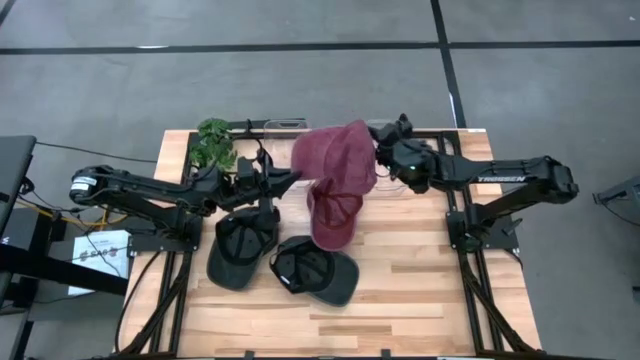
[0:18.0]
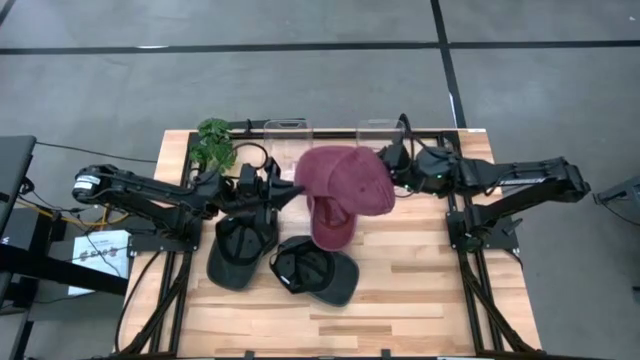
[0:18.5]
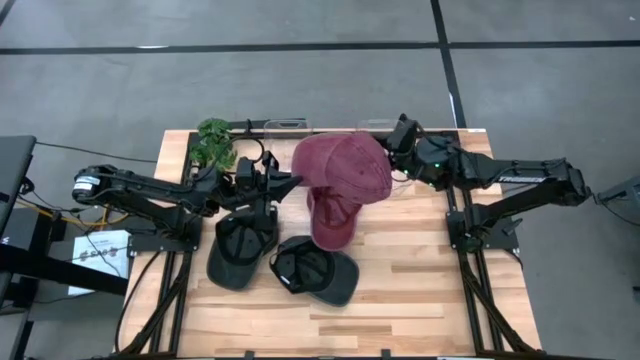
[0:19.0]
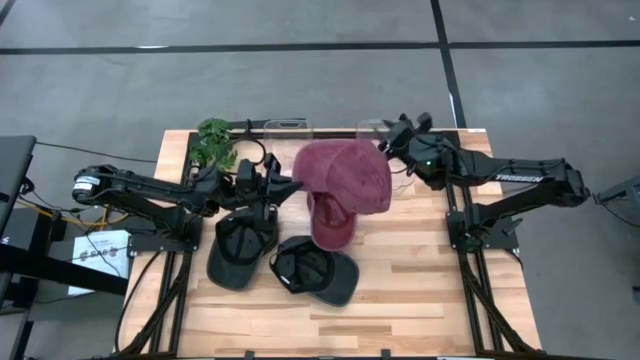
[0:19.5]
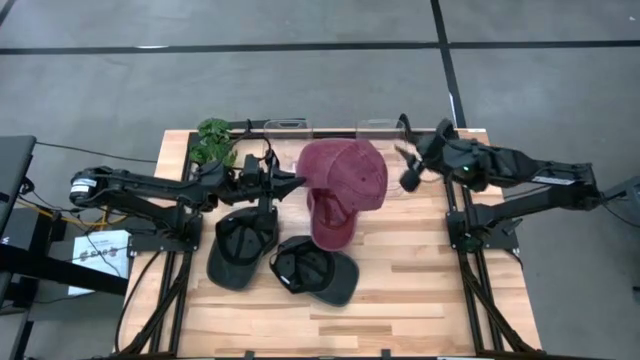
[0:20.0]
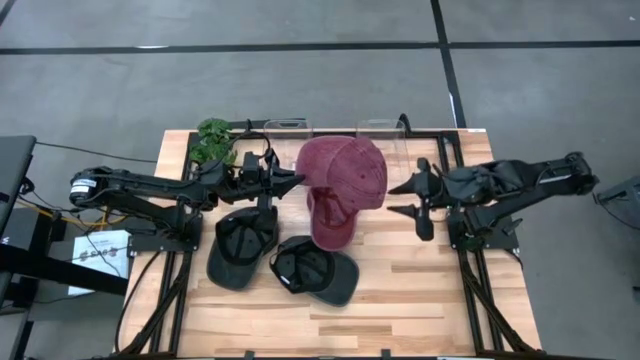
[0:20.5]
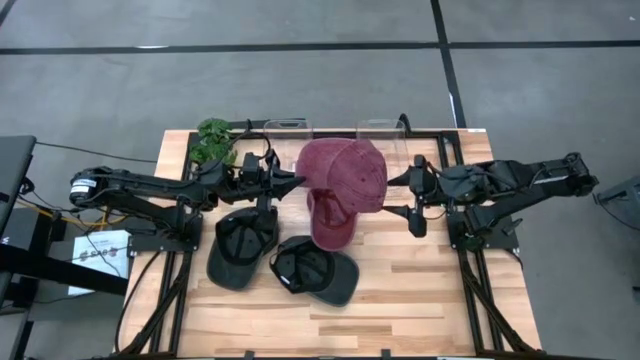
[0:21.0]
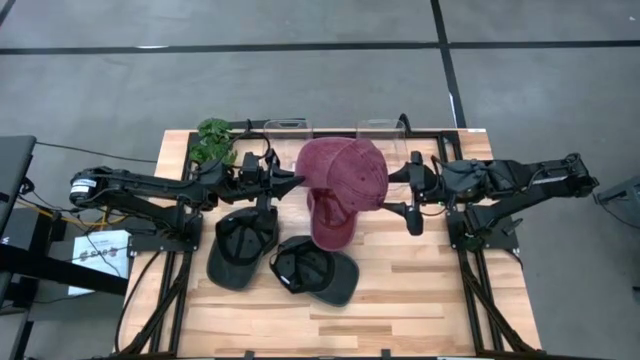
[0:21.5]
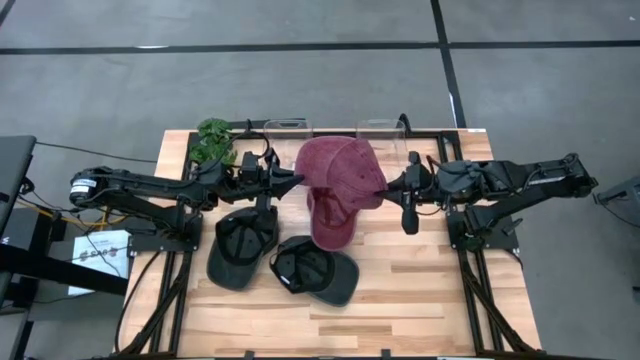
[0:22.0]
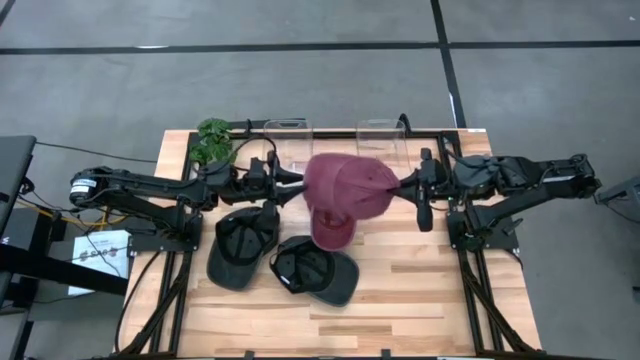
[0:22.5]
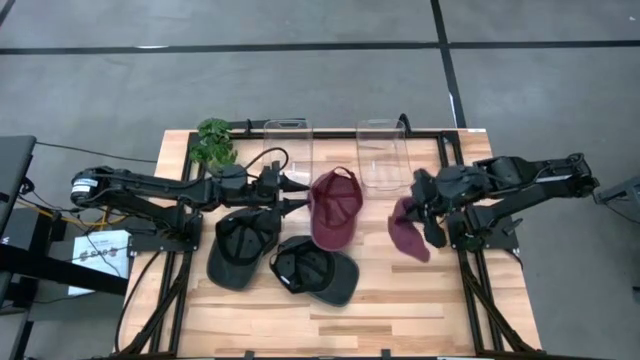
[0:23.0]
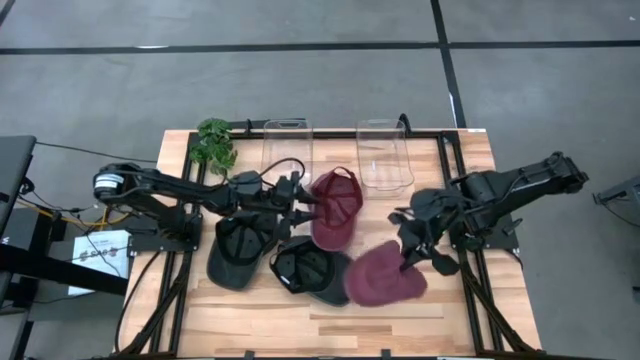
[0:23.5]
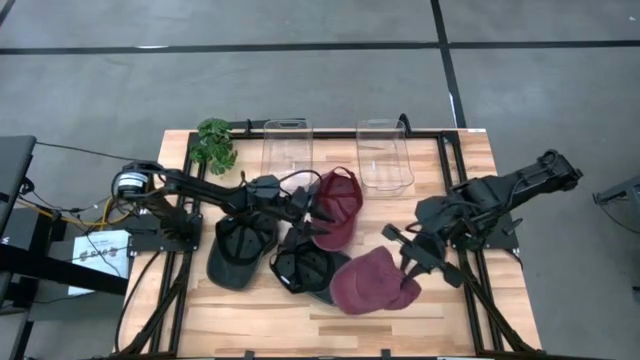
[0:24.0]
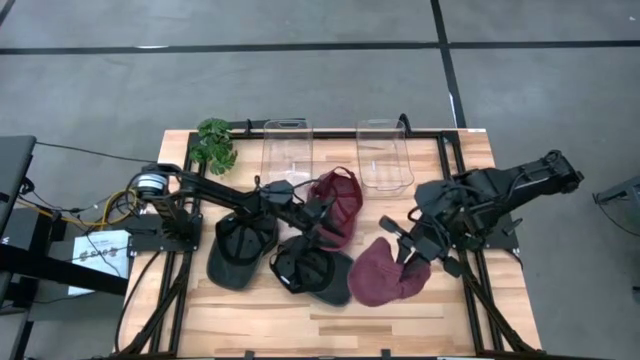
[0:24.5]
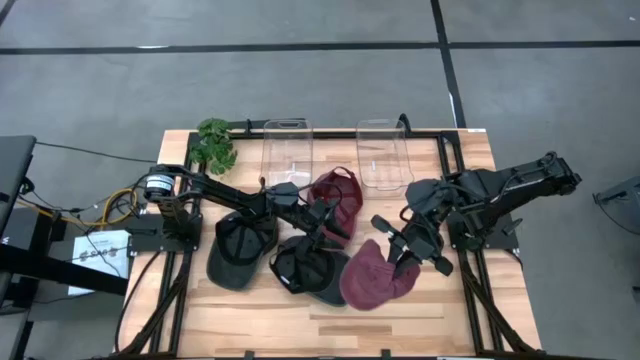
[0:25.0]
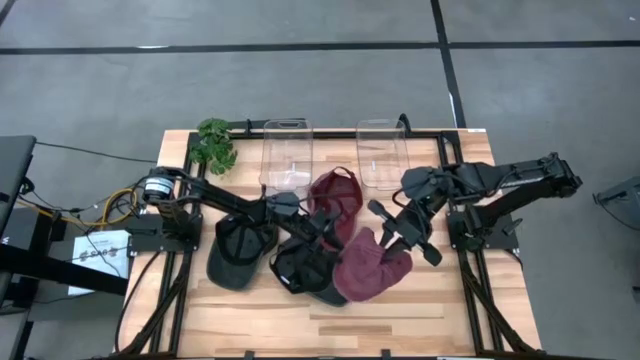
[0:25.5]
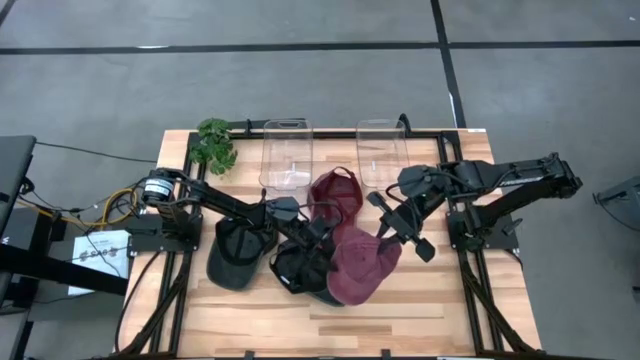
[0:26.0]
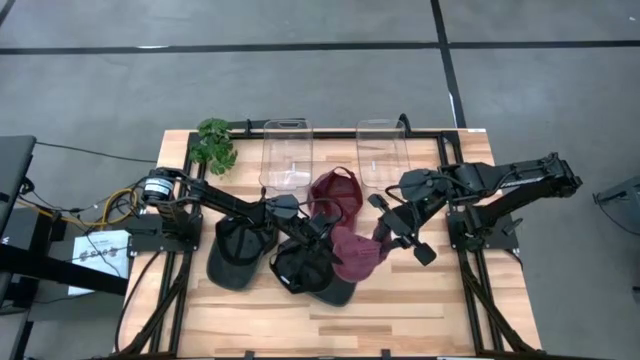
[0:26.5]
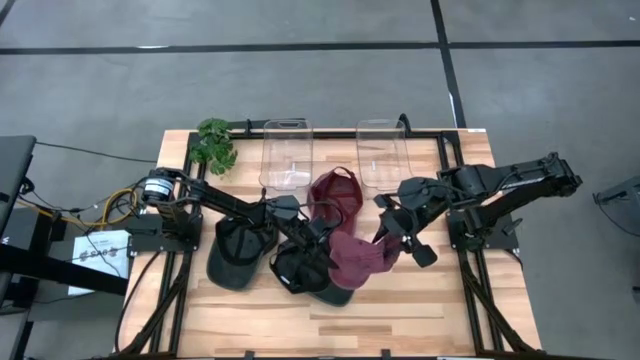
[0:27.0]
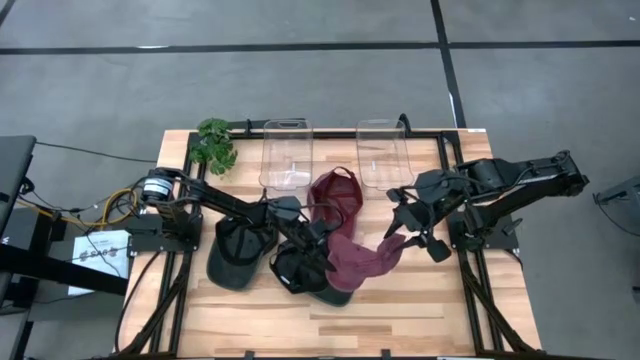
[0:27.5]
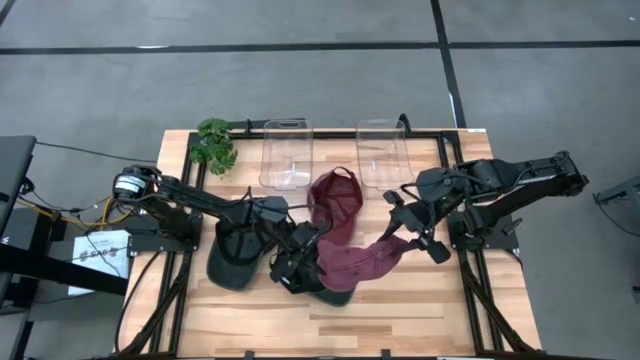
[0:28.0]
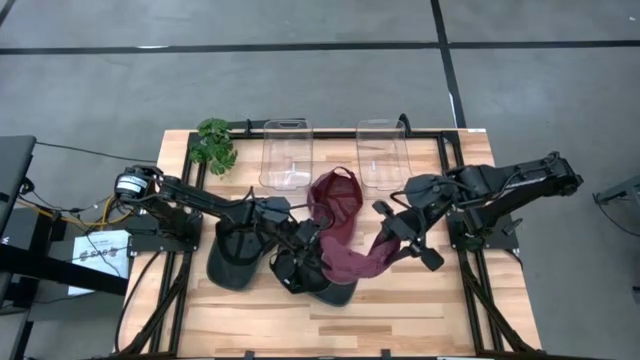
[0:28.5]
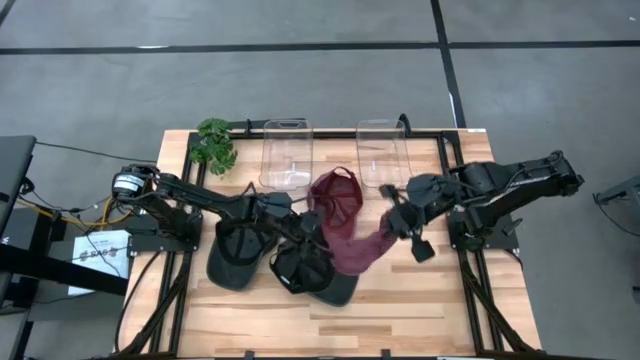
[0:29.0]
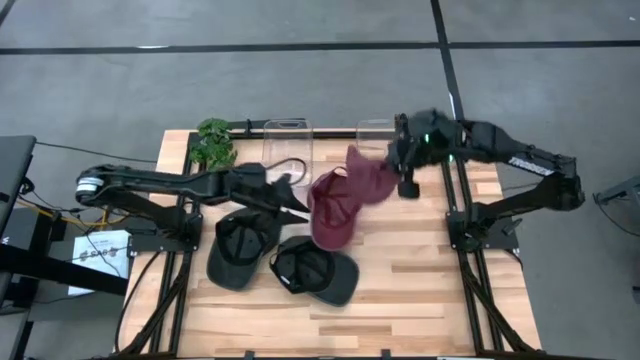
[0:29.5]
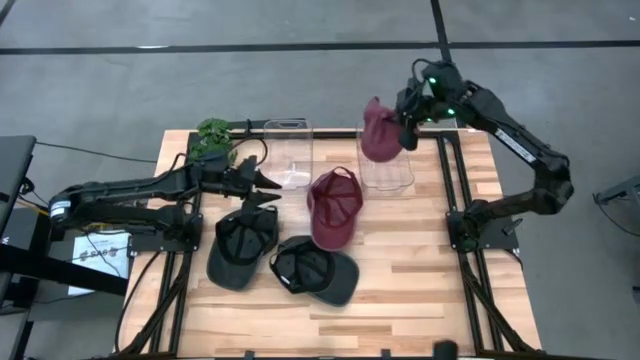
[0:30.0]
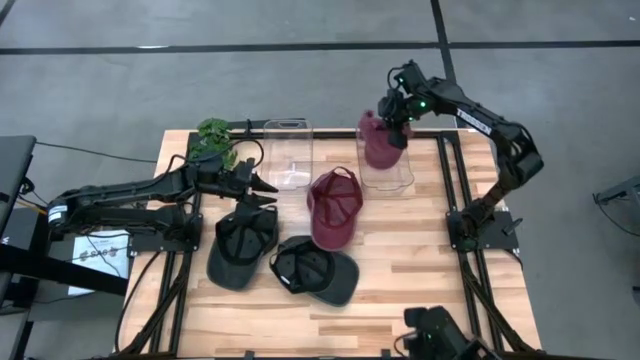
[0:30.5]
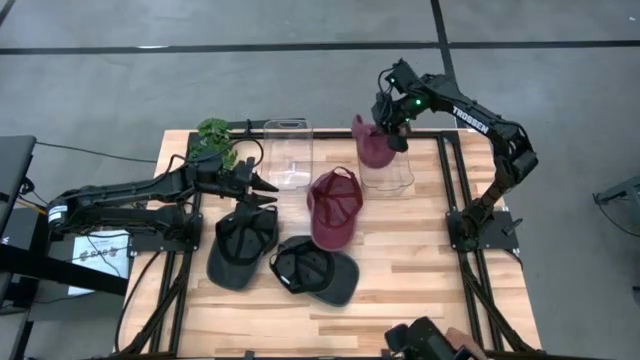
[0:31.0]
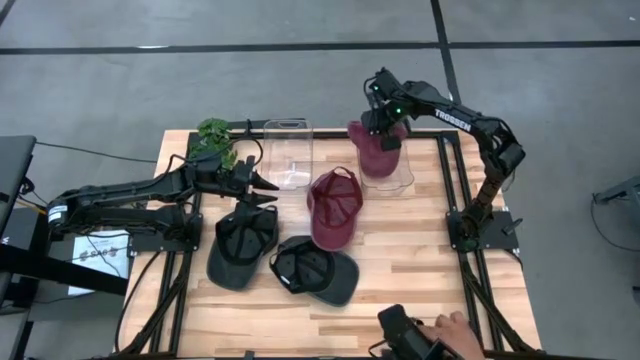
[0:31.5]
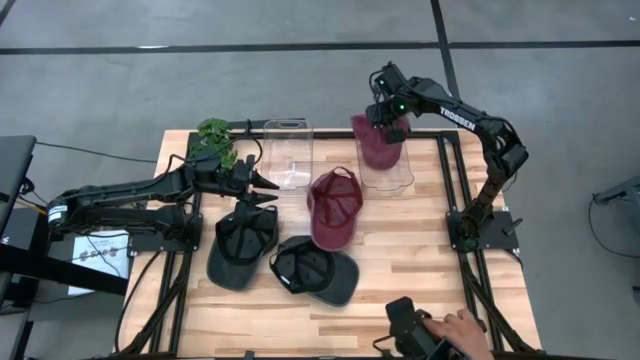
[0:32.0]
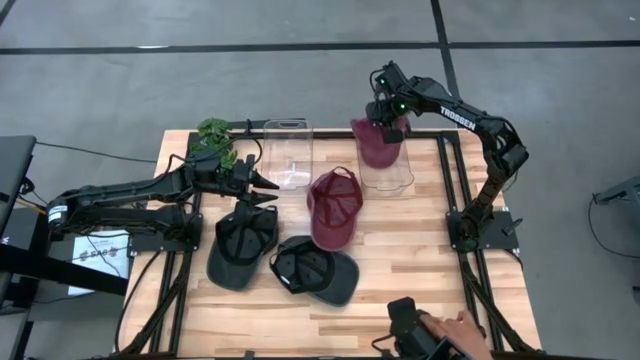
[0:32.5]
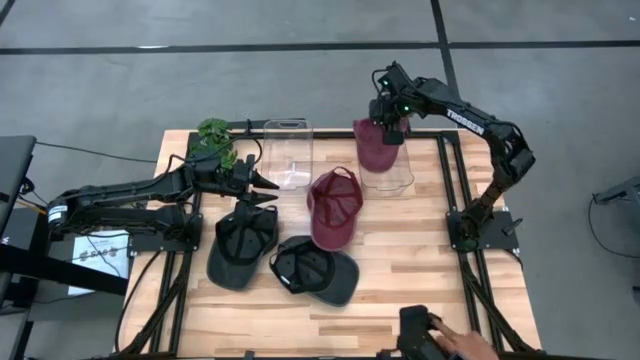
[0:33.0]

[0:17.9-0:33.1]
Task: Pick & Place hat
Put the right red cap into the right transparent bin

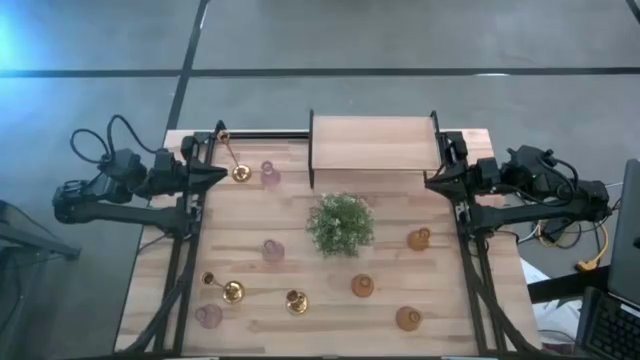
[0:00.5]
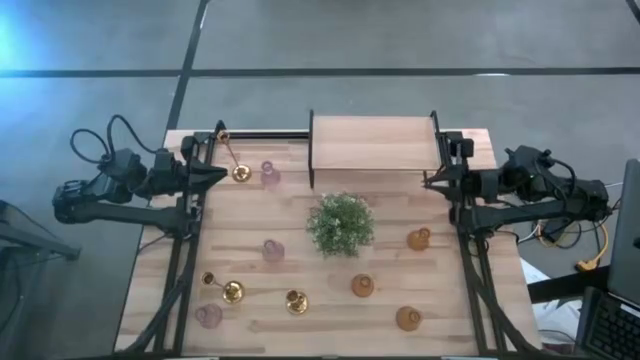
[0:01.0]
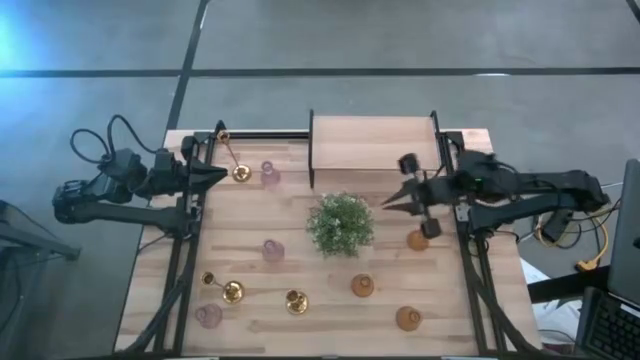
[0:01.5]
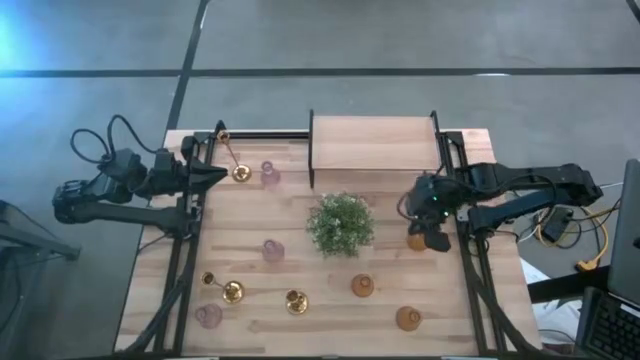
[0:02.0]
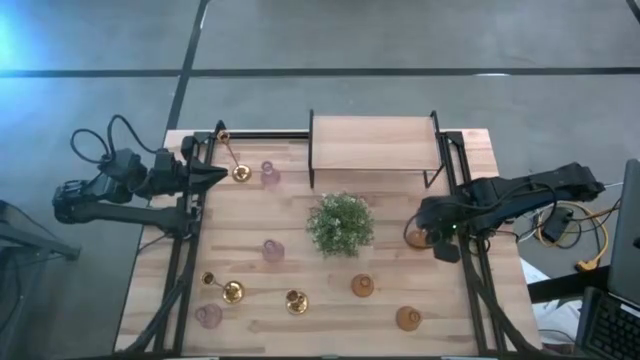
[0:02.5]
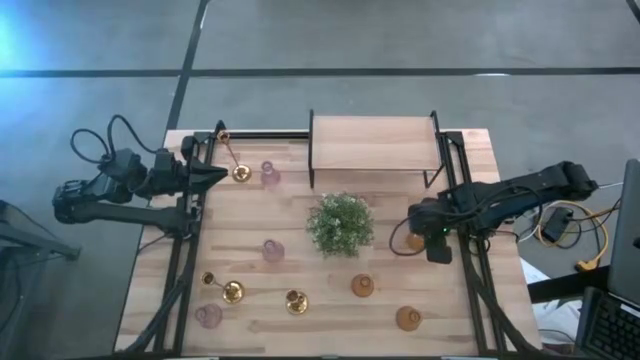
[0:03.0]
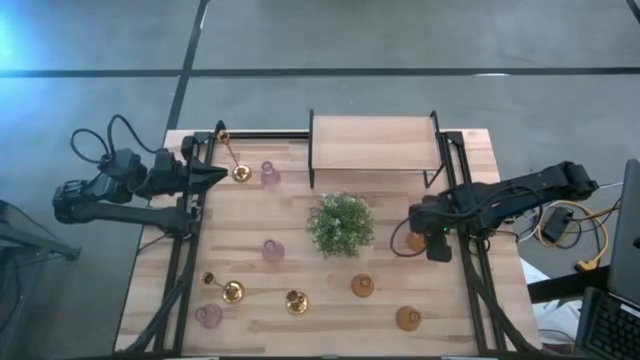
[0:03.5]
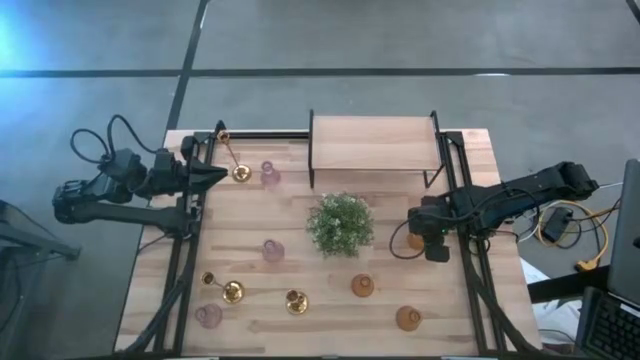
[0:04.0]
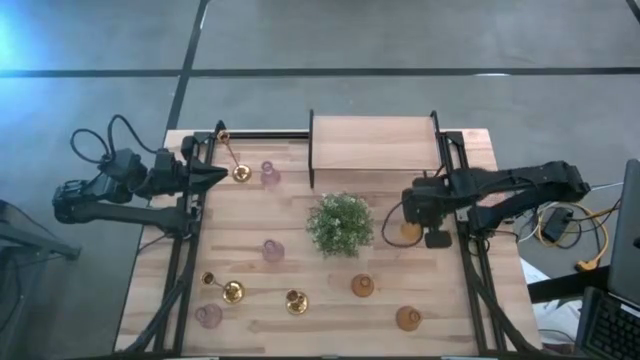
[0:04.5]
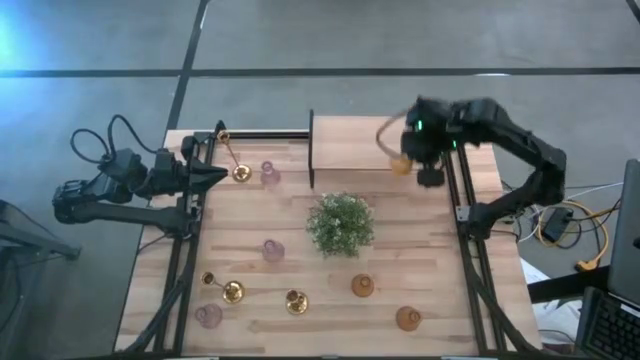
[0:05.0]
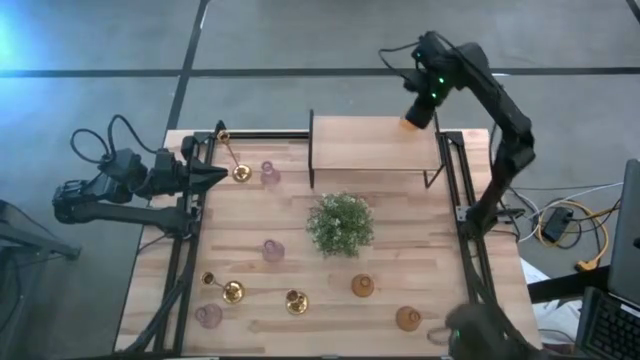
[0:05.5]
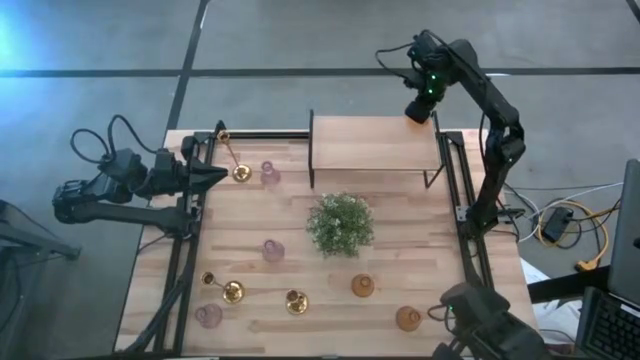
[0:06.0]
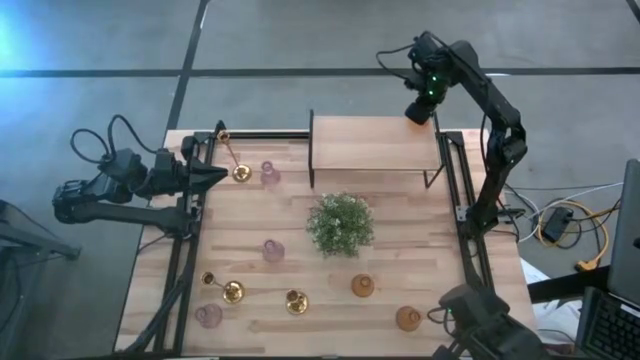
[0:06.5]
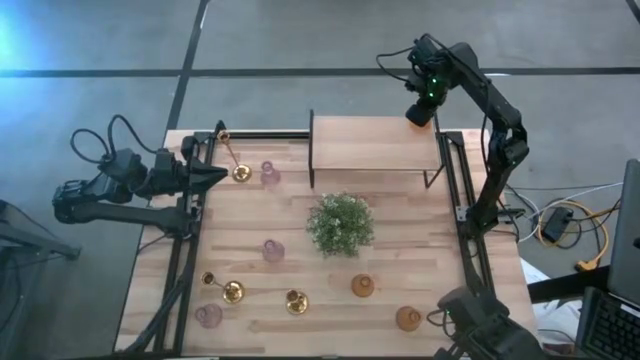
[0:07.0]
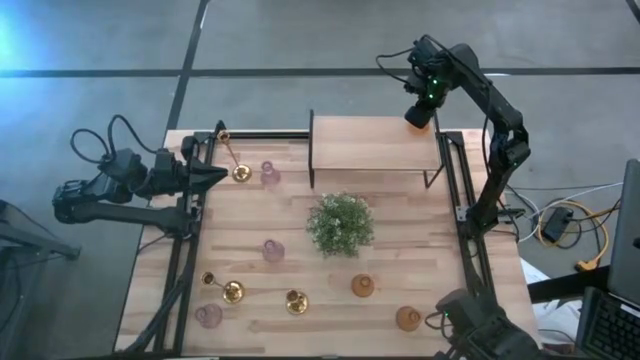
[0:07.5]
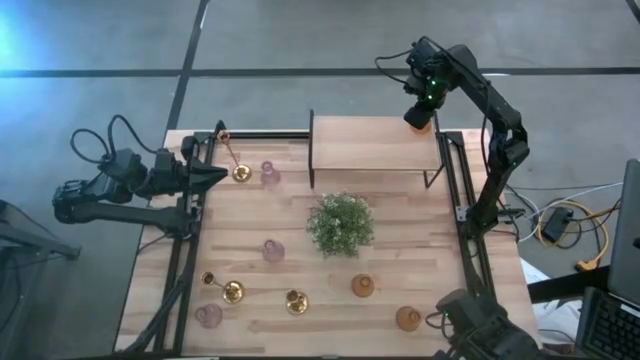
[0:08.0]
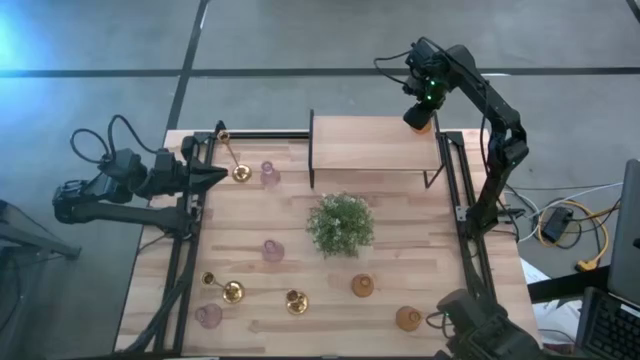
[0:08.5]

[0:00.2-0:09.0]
Task: Pick & Place candle stick holders
Put the top orange candle holder on the shelf
